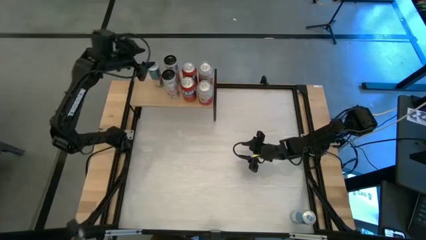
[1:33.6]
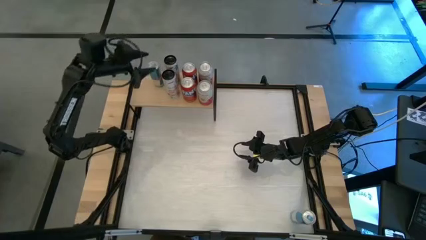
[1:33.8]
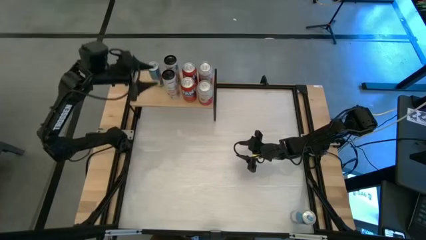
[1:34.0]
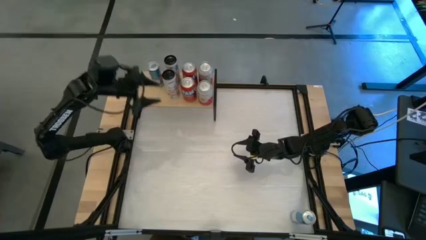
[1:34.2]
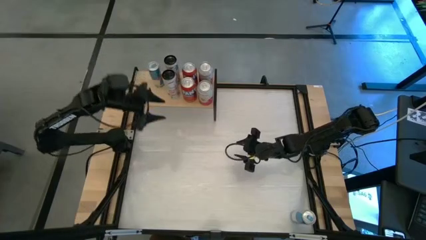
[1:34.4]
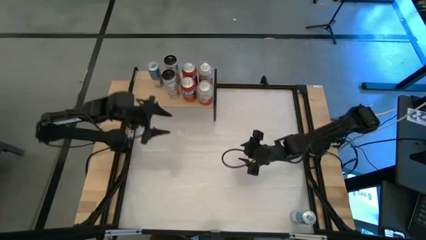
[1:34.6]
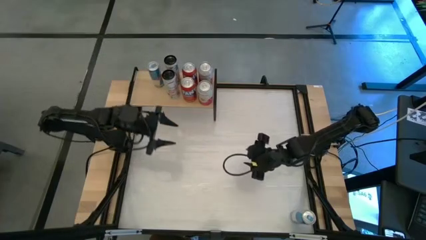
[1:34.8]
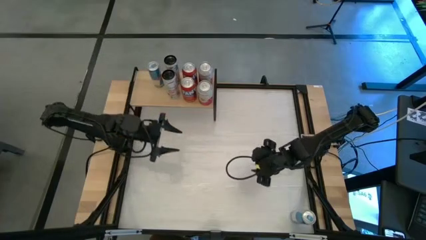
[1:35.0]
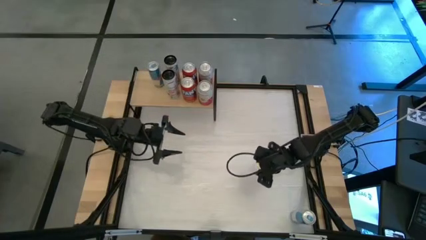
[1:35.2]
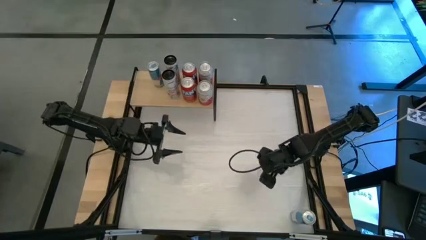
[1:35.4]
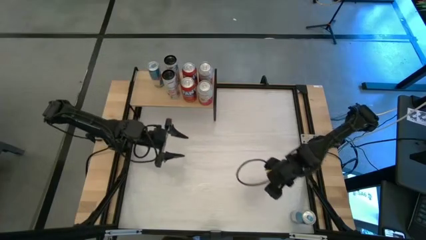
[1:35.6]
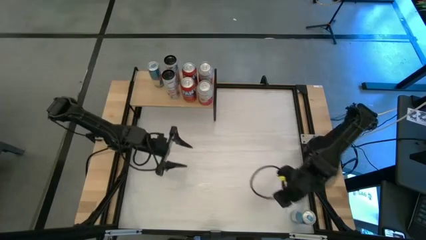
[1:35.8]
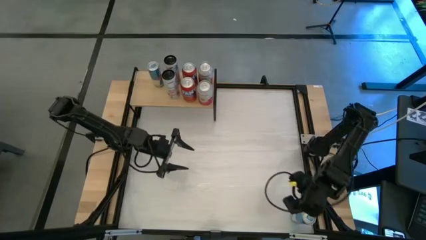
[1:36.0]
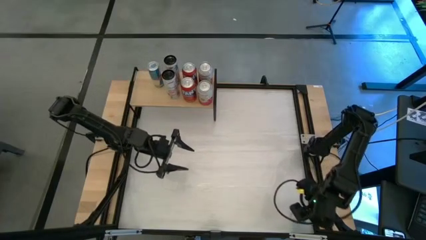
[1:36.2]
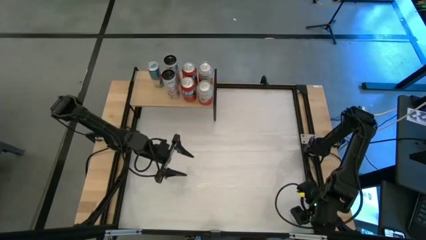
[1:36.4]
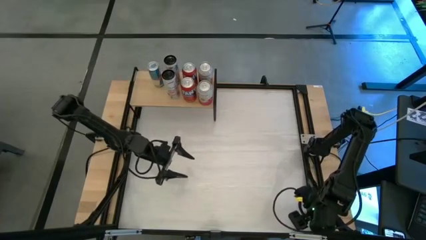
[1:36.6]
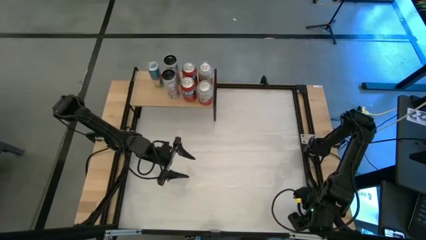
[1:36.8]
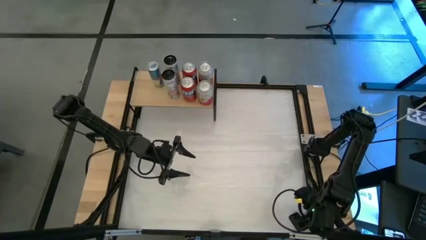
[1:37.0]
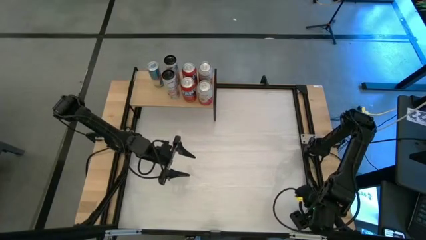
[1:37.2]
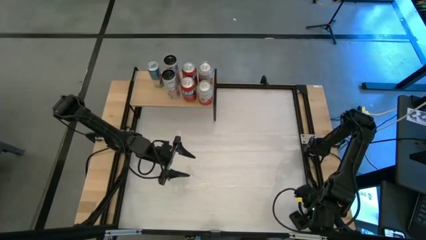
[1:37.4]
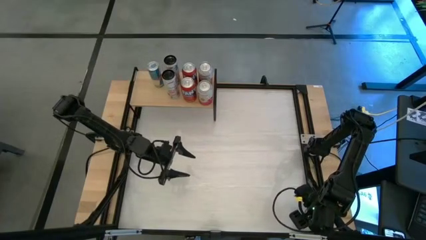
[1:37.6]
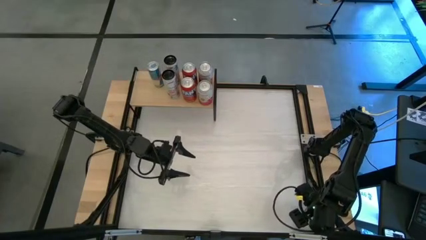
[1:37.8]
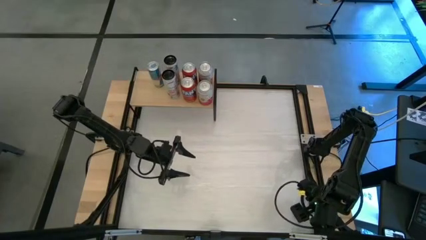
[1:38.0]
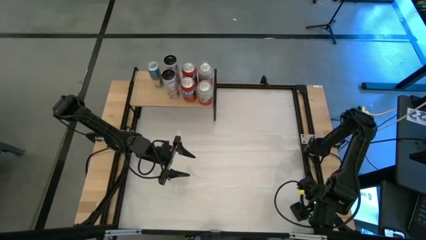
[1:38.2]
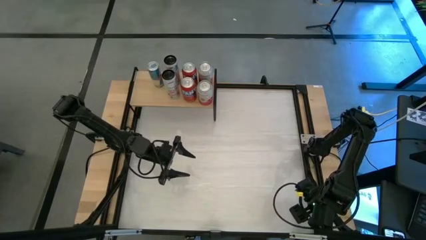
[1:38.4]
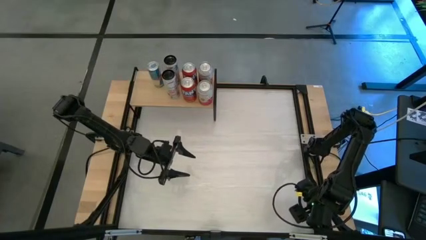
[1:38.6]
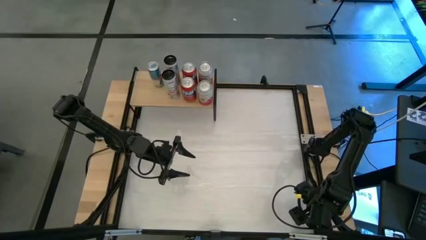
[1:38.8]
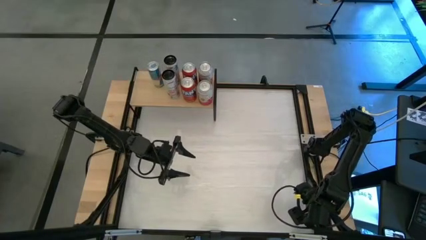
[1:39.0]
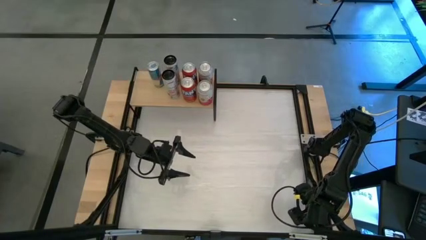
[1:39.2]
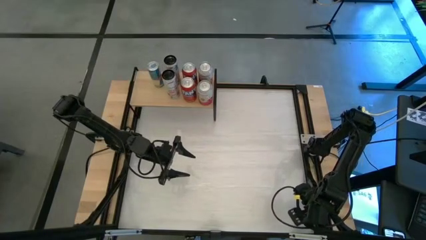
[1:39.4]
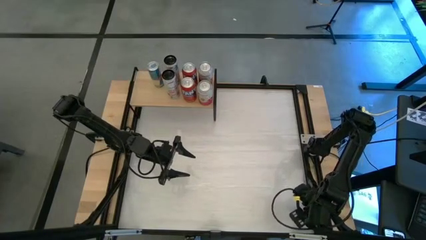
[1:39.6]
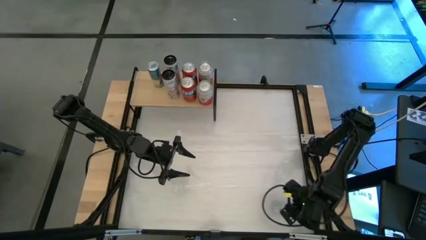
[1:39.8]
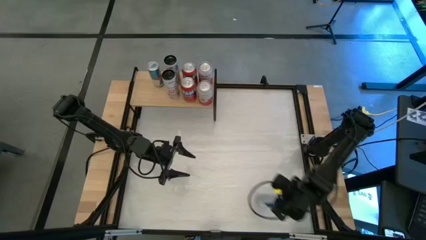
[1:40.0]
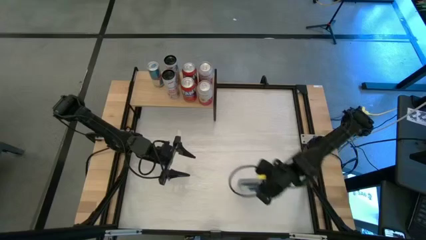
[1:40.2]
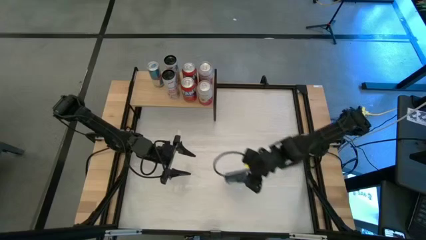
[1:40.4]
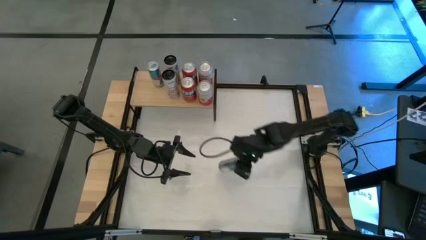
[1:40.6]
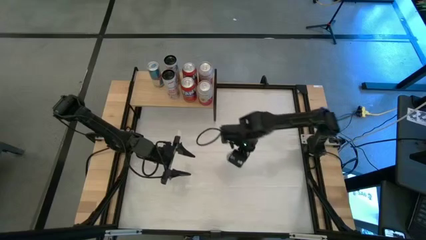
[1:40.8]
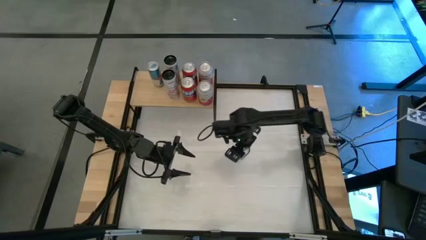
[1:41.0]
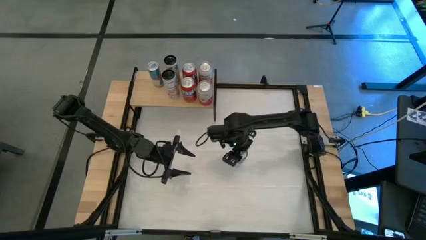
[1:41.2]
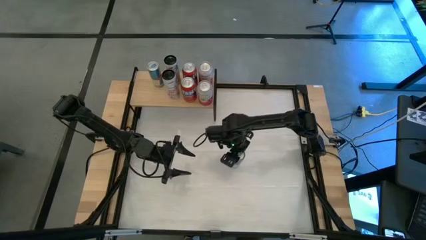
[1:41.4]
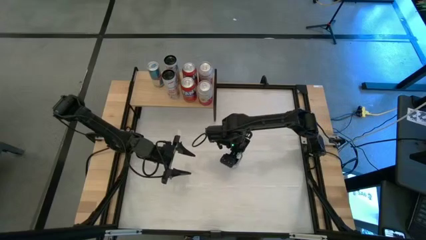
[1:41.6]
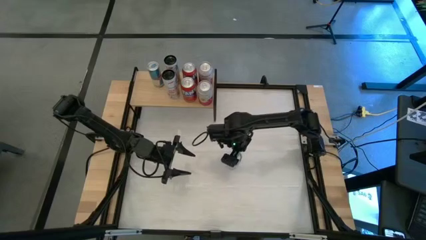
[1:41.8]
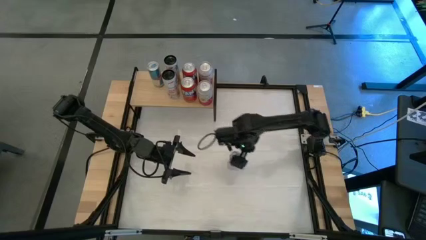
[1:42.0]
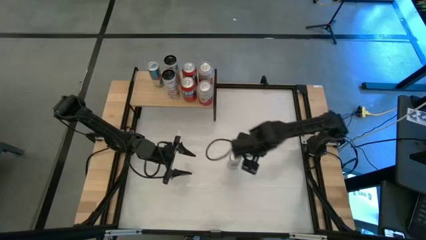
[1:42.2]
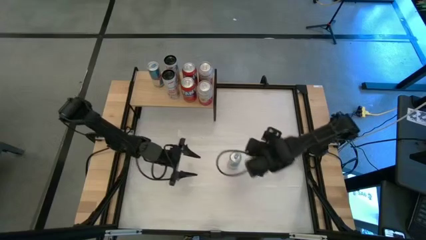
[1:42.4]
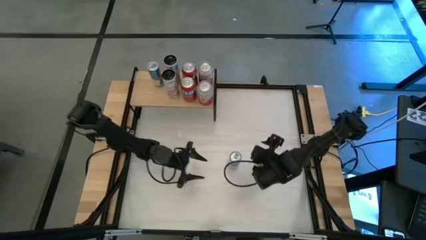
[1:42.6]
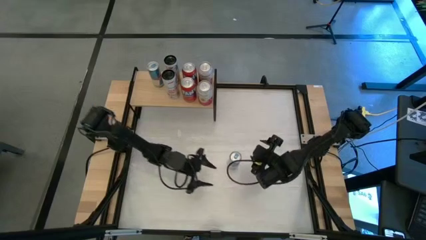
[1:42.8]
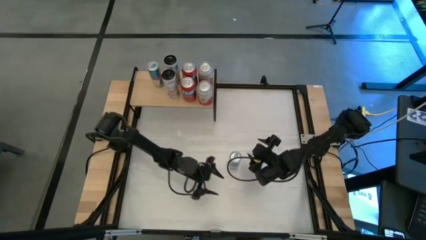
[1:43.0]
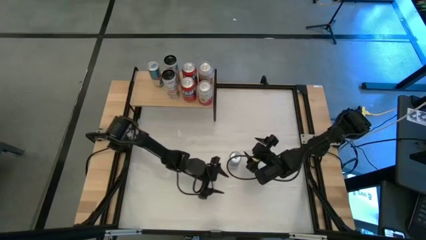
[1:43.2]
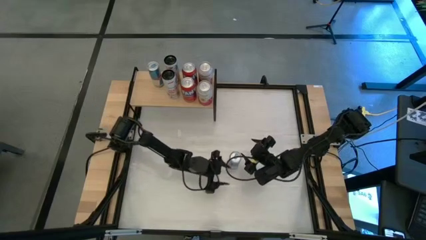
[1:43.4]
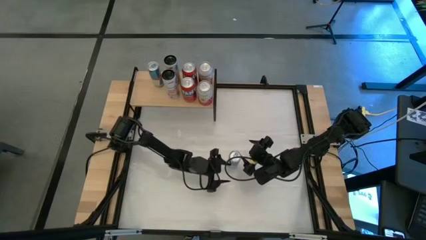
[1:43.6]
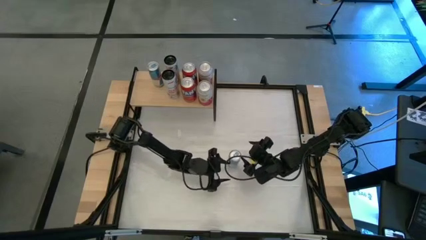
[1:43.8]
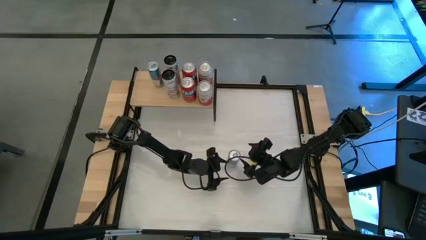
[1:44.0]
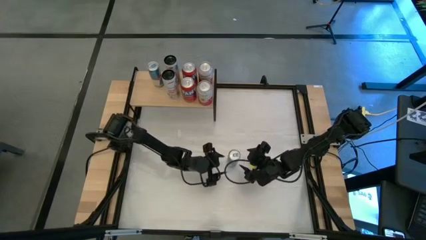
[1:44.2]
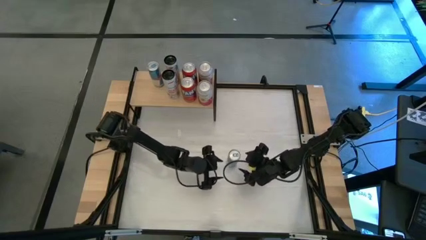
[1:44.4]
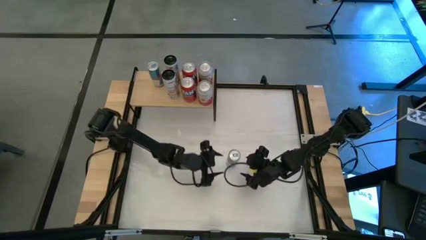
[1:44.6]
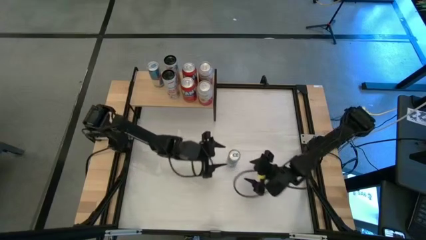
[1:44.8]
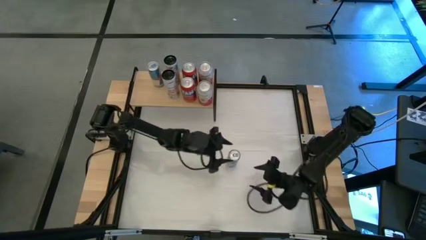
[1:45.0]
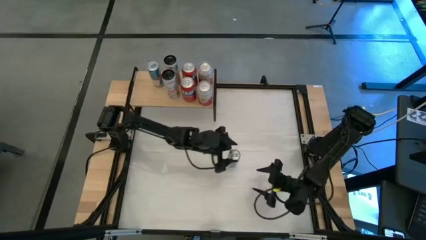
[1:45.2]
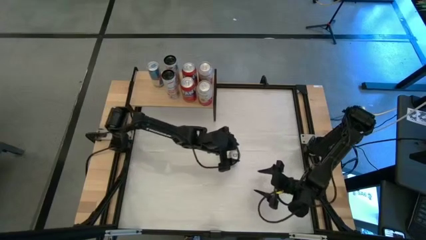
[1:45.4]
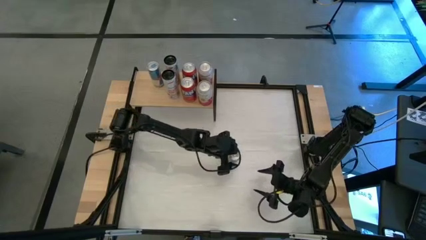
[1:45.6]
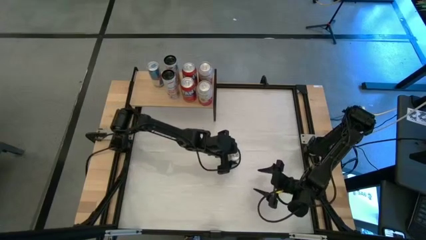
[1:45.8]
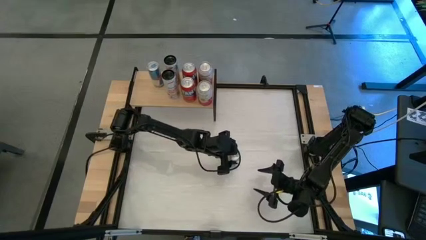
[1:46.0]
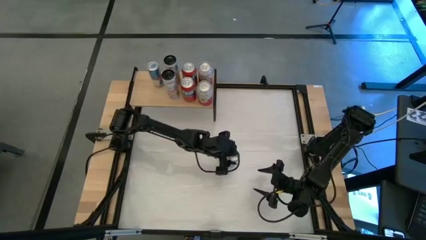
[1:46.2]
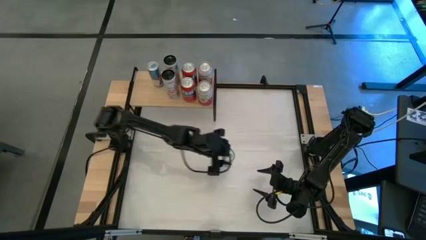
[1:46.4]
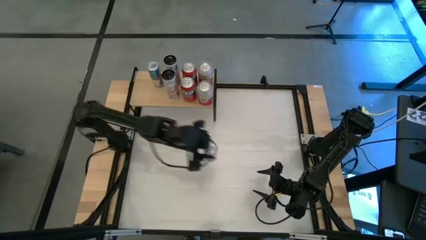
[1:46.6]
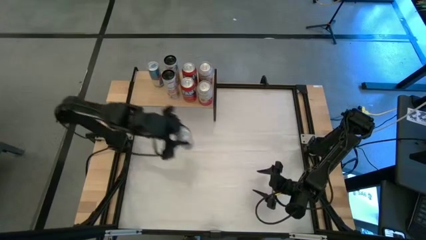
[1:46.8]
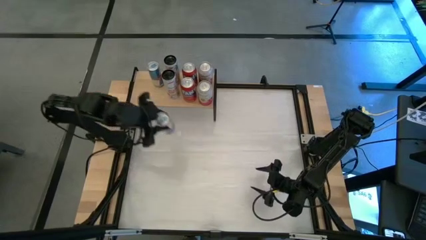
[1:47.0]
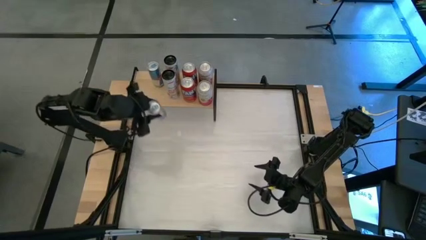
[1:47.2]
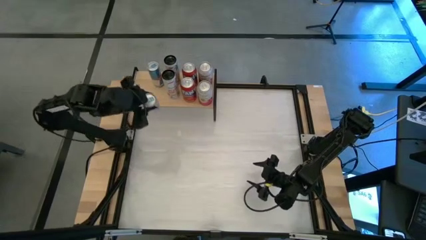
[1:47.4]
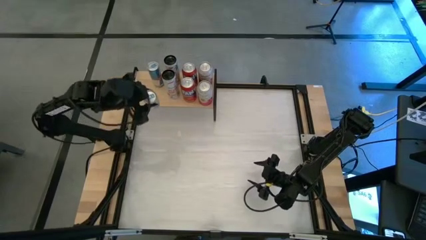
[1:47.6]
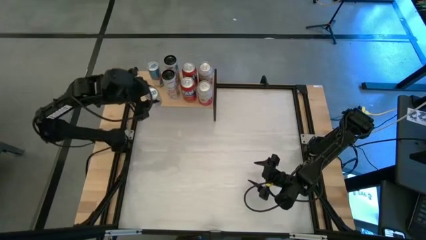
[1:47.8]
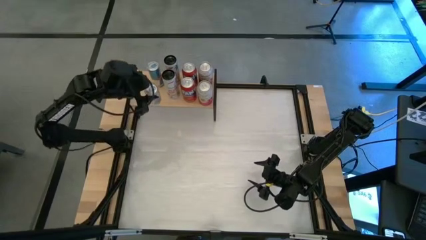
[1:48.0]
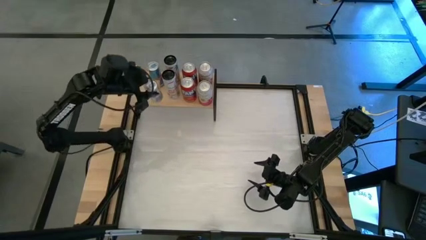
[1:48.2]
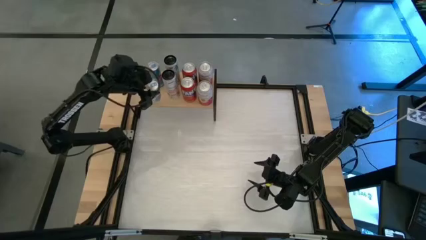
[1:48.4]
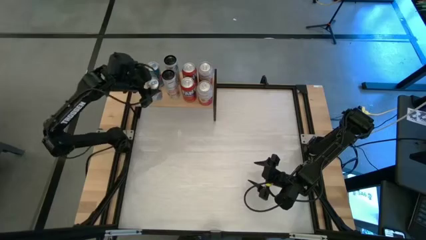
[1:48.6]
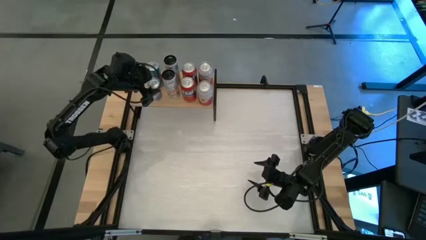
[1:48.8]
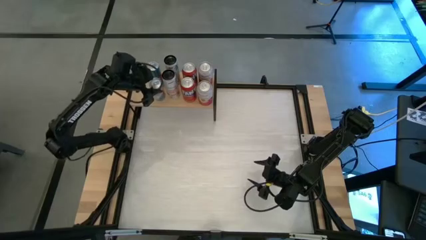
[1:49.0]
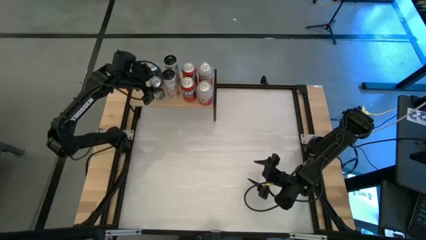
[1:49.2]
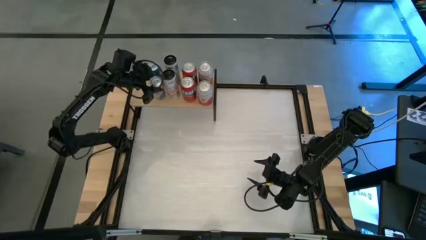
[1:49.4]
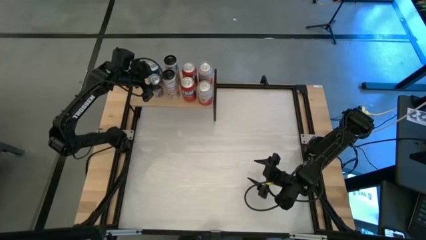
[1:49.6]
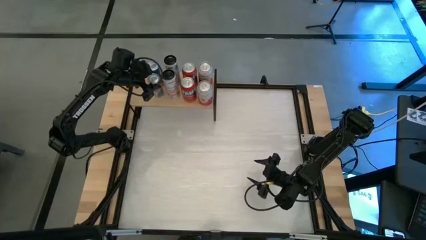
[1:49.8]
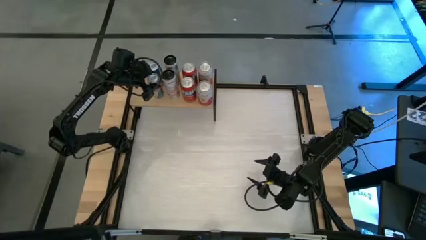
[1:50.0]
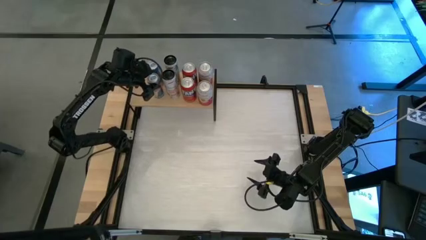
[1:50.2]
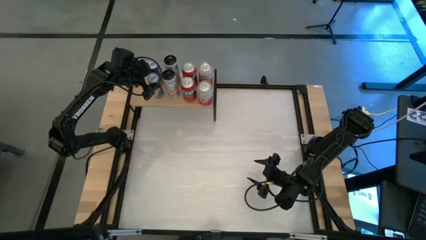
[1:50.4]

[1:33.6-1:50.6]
Task: Place canned beverage on shelf
Put the blue soda can on the shelf aligned with the other blue soda can
